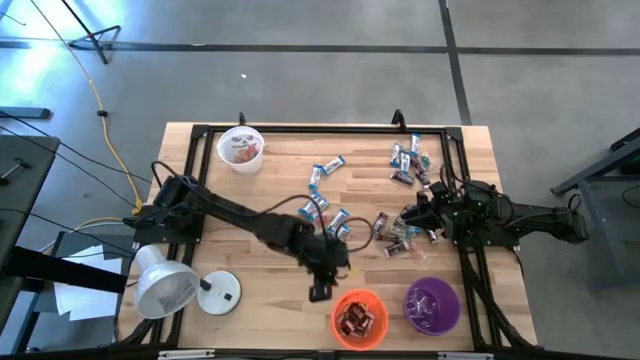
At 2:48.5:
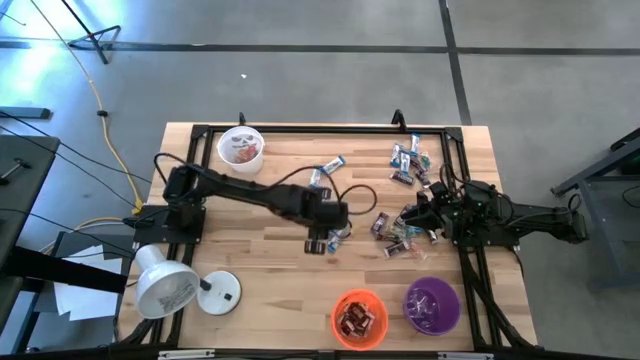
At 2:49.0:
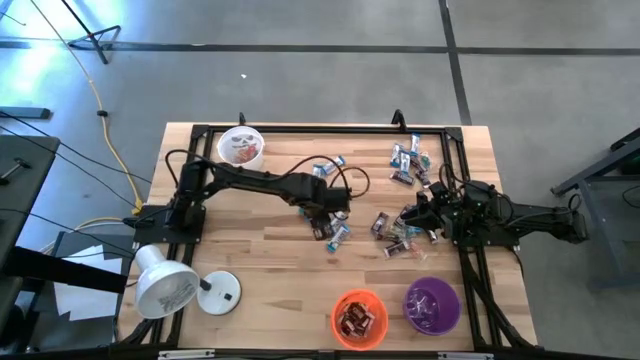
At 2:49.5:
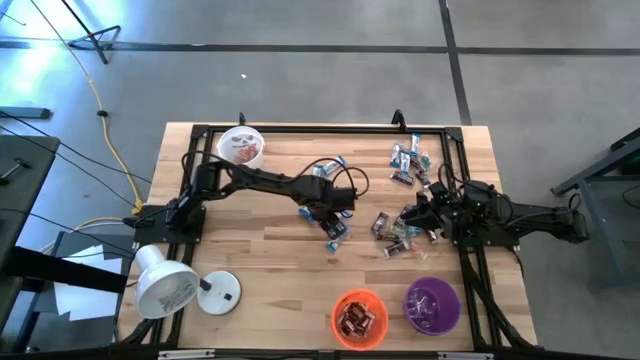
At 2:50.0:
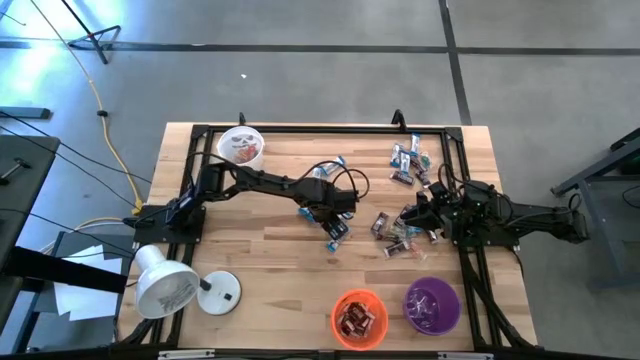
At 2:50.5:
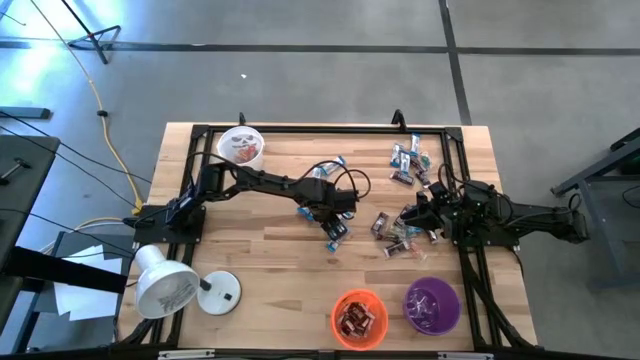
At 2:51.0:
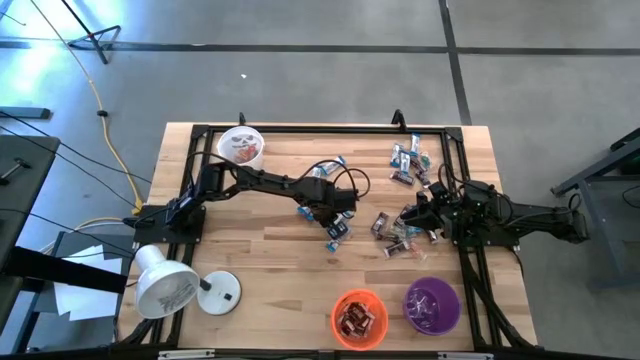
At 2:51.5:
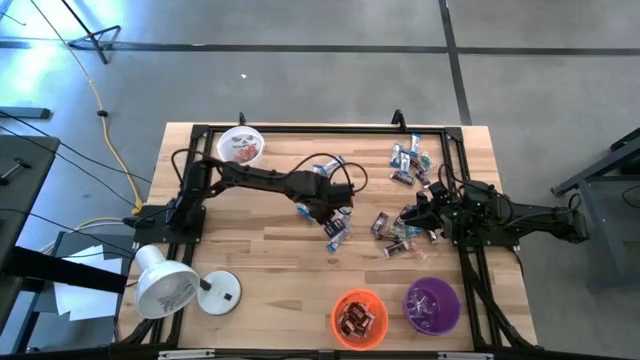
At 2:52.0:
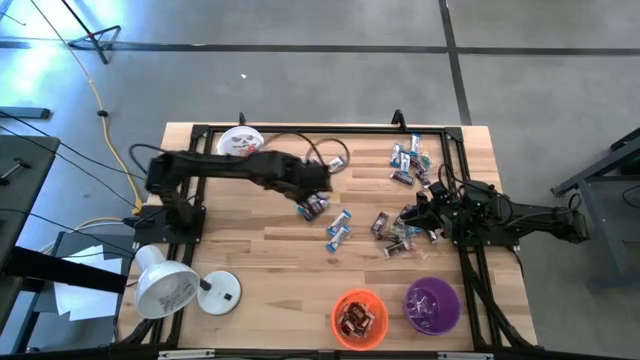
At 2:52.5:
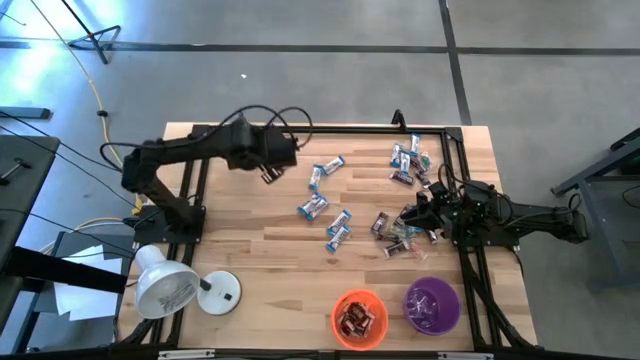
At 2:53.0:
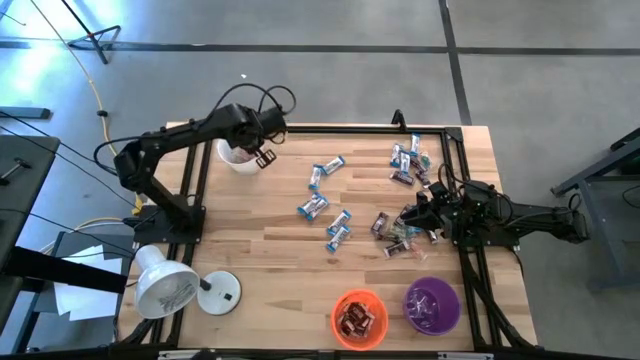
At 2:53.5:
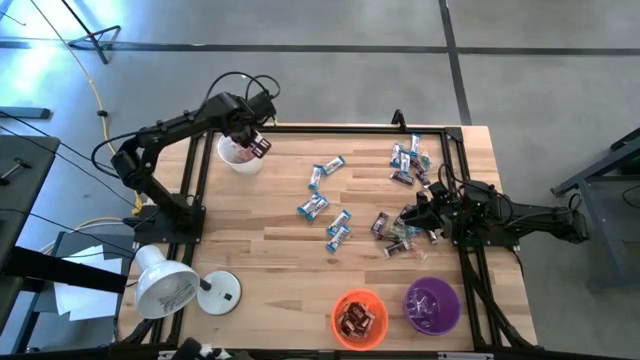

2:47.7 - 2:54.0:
Task: Organize candy in baskets
Put the orange gummy into the white bucket

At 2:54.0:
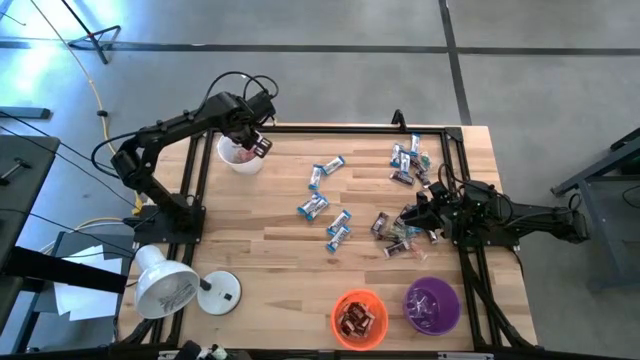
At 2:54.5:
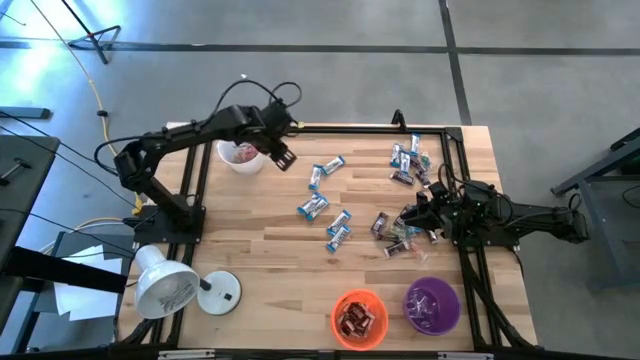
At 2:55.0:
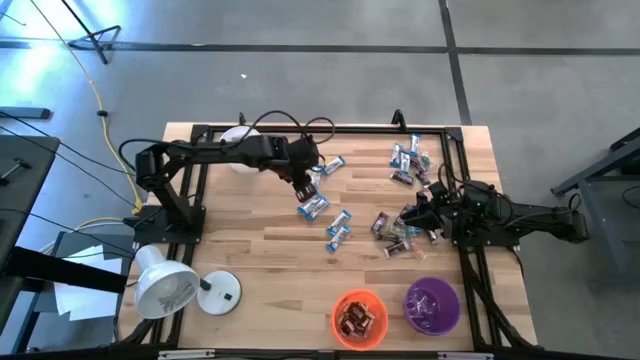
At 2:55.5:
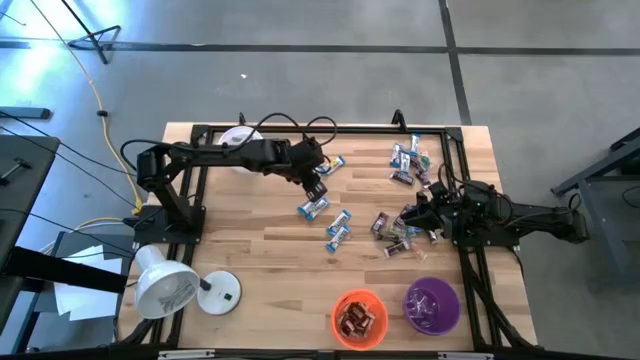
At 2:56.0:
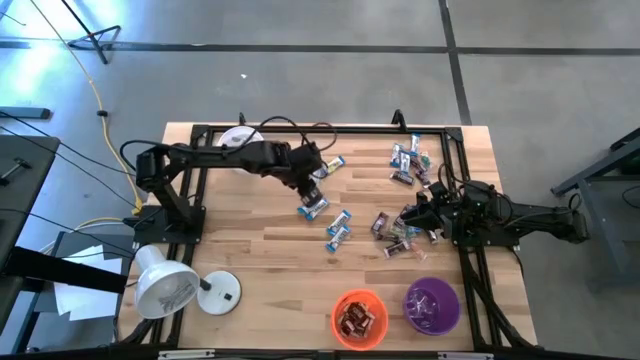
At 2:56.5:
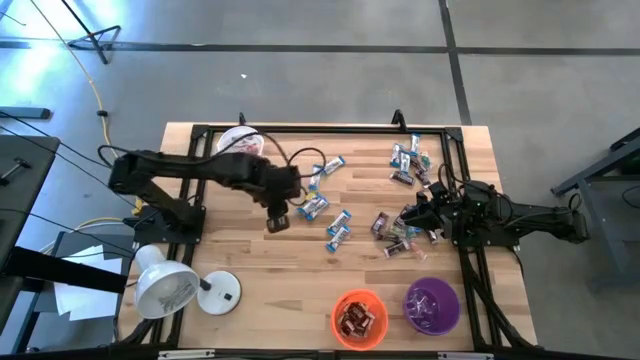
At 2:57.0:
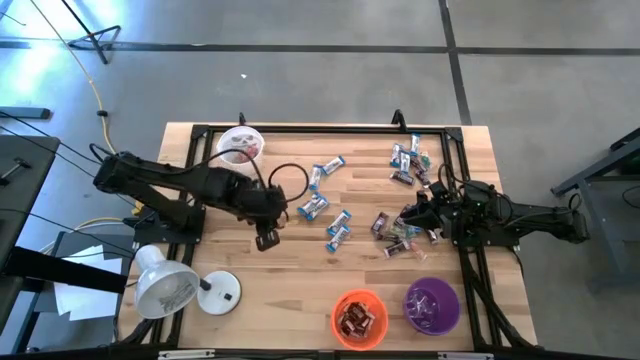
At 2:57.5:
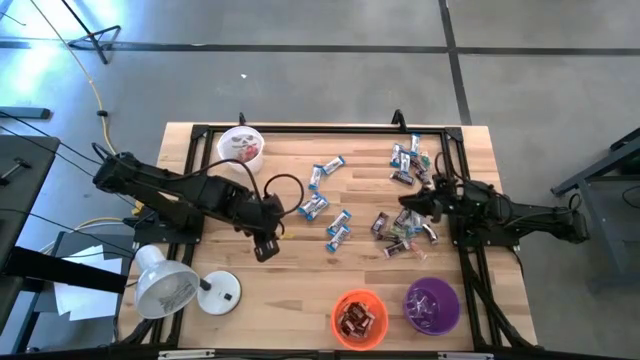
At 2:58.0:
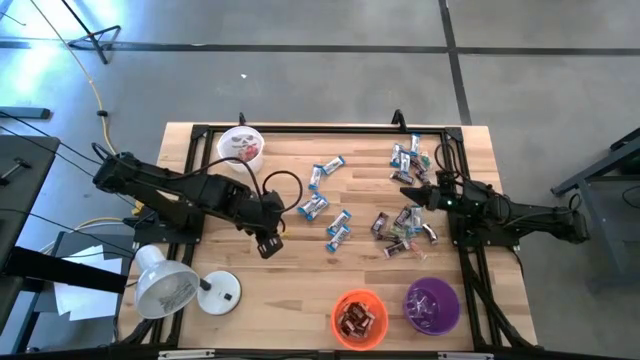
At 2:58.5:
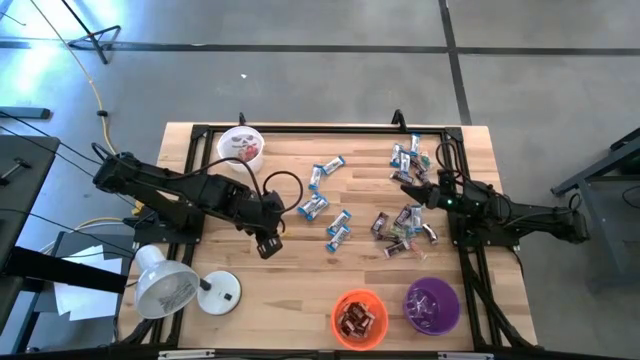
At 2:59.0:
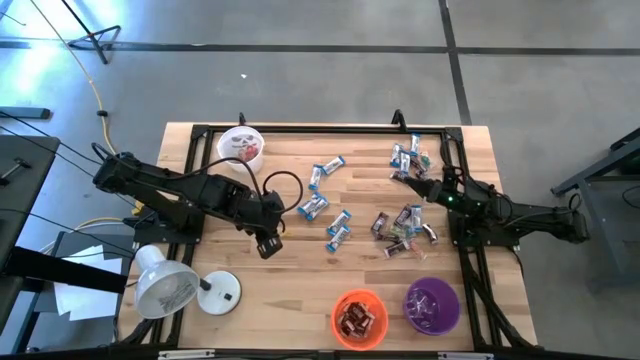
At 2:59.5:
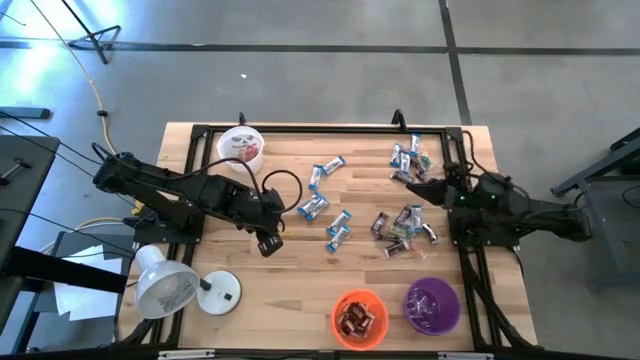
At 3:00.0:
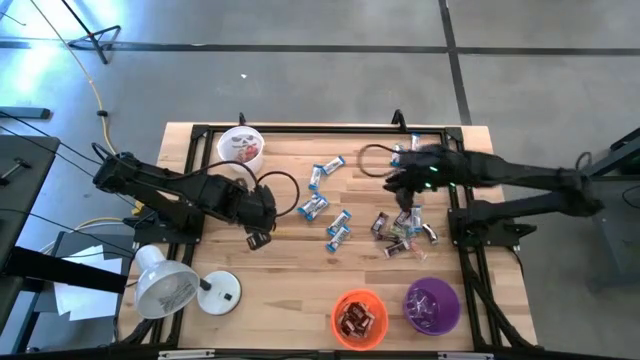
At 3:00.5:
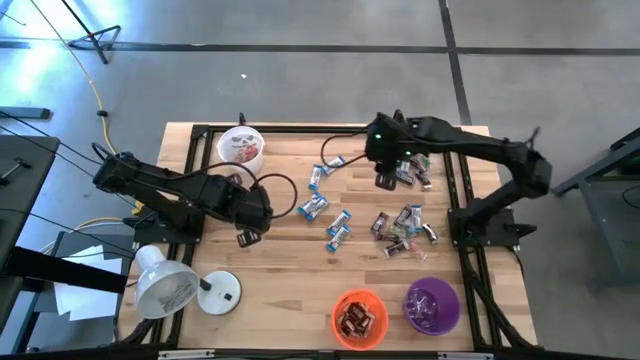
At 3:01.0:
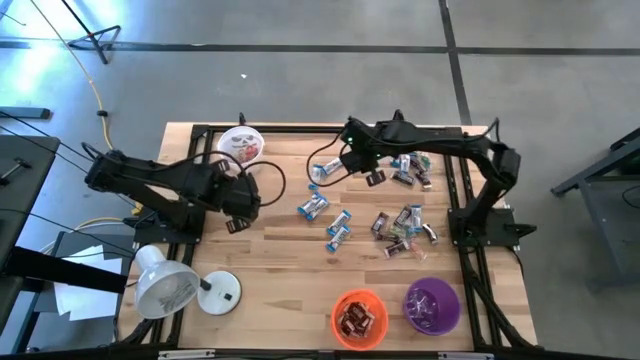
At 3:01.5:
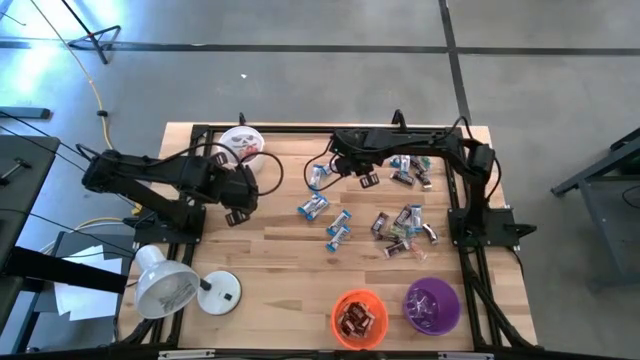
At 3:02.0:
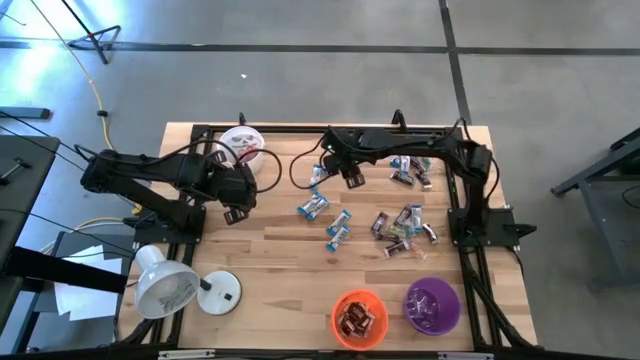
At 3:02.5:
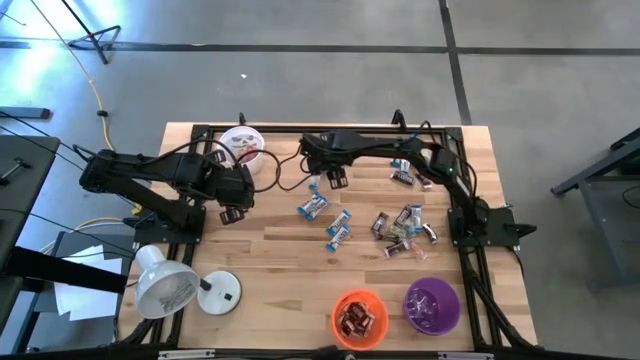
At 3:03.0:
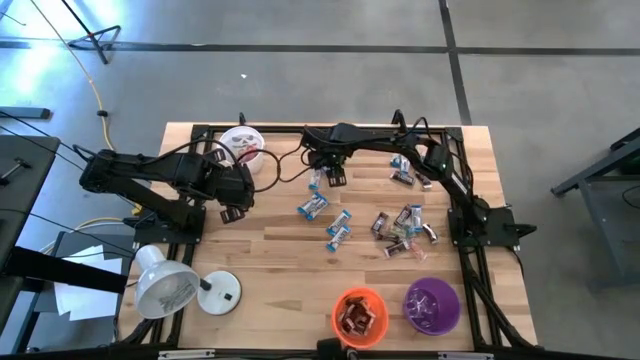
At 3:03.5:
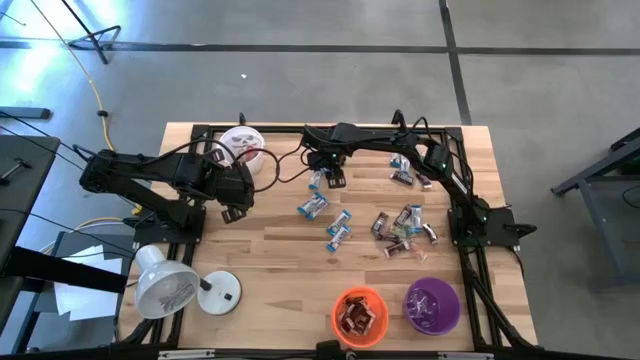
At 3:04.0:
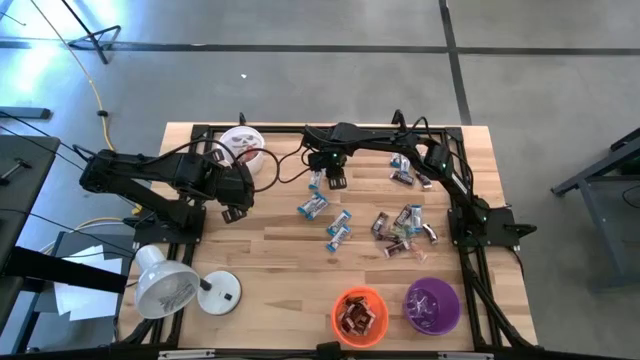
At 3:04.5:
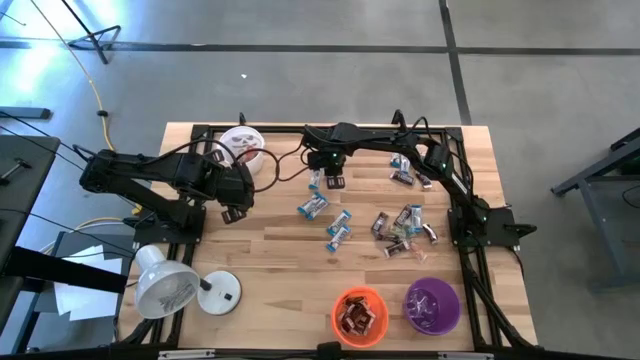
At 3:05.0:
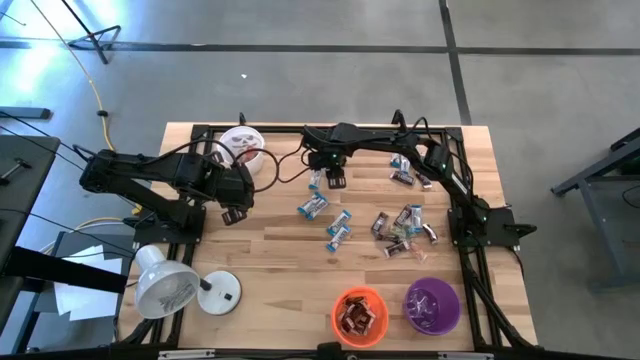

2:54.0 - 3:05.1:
Put the white chocolate into the purple bucket

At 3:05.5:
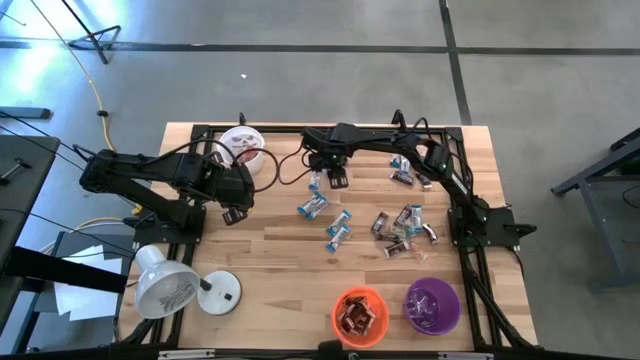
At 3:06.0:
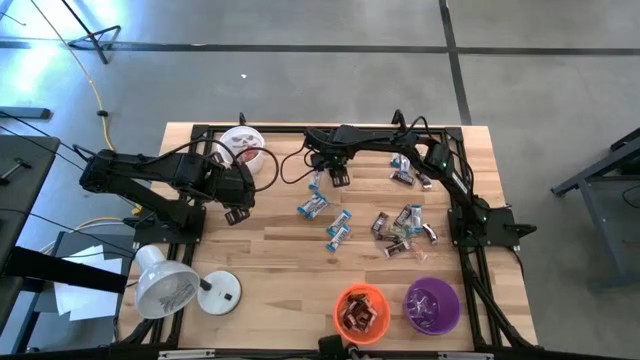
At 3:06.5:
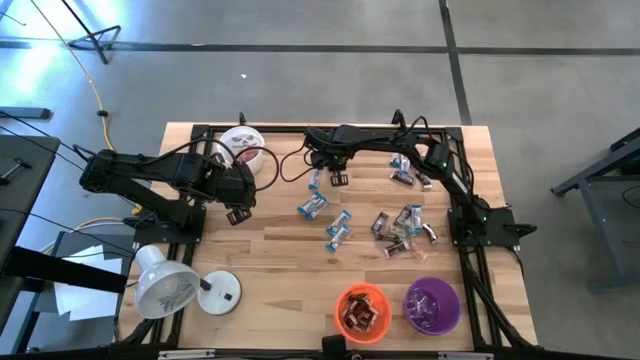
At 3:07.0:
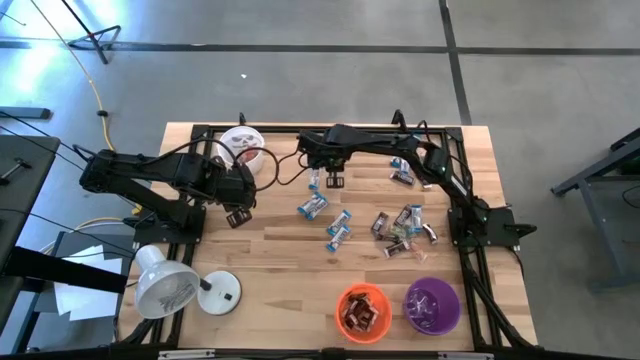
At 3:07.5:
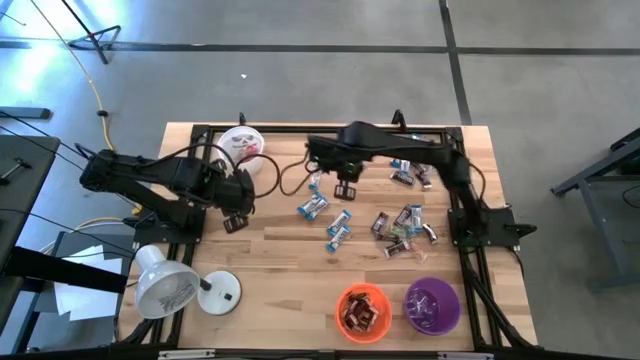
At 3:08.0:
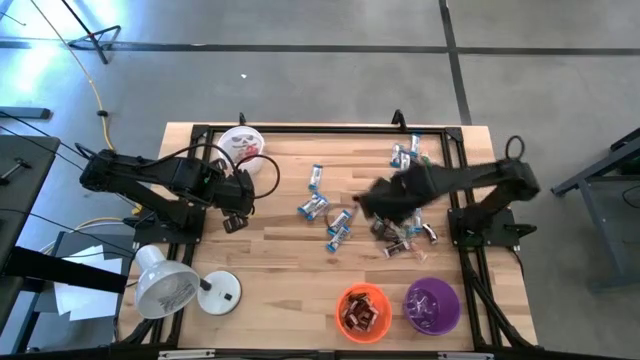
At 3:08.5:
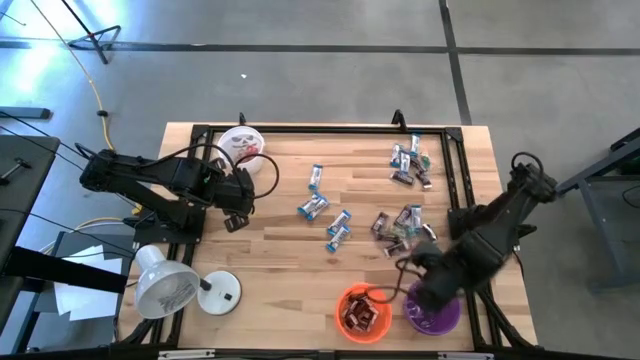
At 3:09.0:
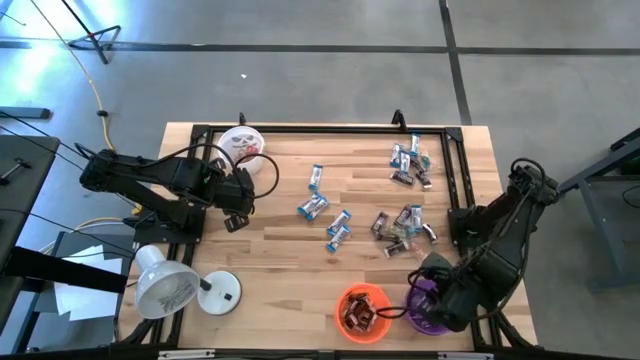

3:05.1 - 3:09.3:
Put the white chocolate into the purple bucket
